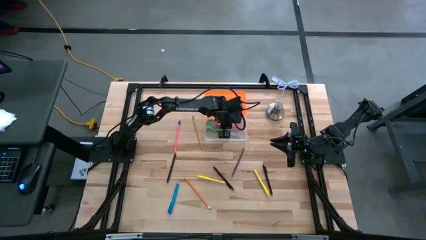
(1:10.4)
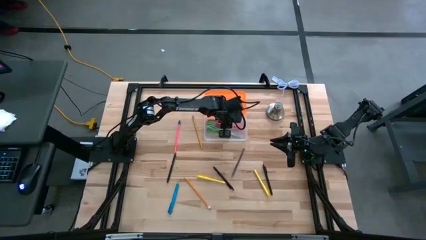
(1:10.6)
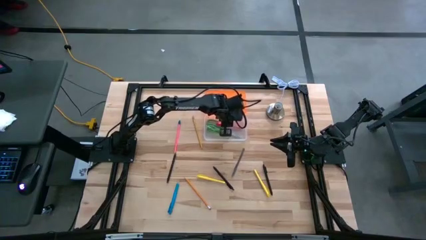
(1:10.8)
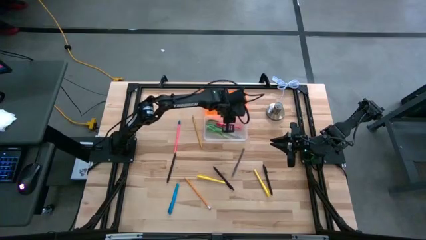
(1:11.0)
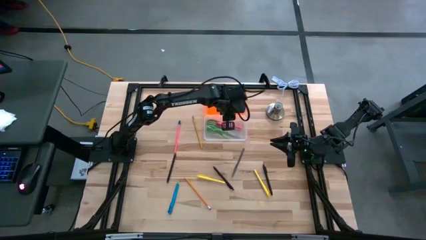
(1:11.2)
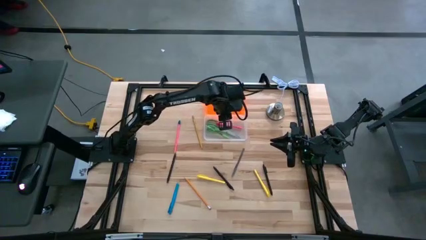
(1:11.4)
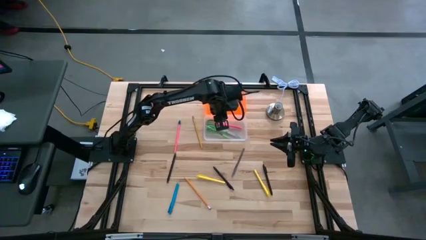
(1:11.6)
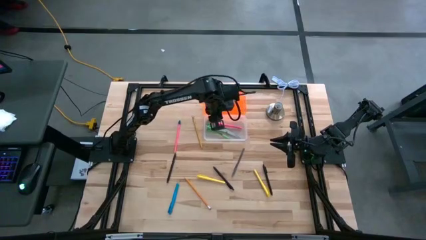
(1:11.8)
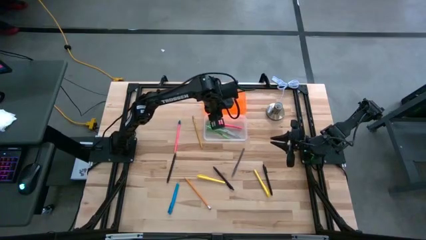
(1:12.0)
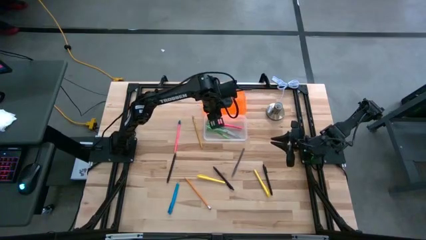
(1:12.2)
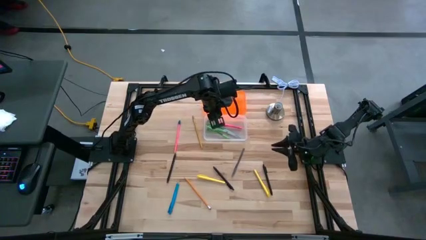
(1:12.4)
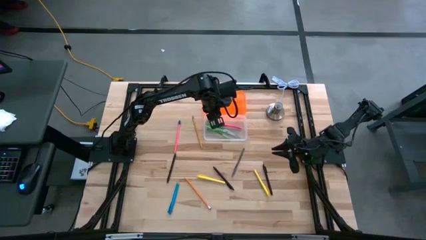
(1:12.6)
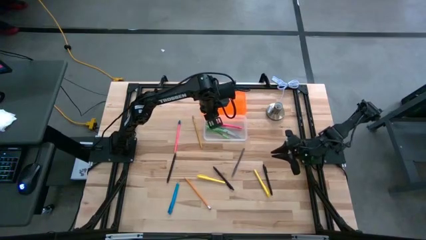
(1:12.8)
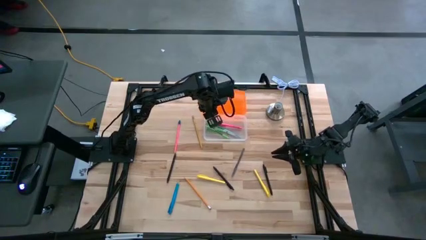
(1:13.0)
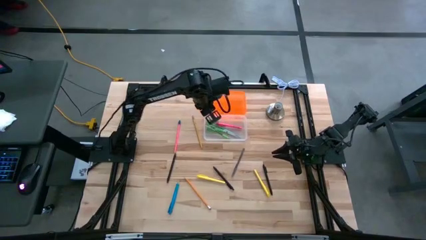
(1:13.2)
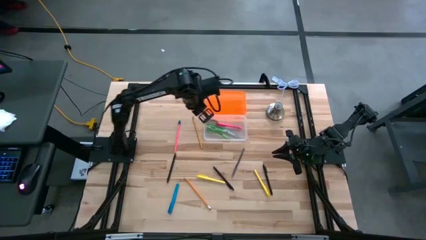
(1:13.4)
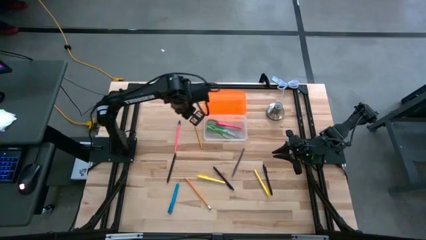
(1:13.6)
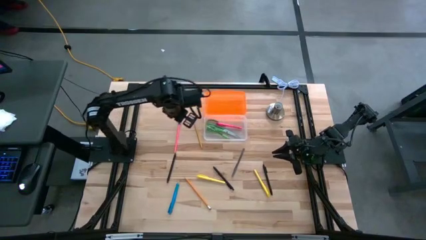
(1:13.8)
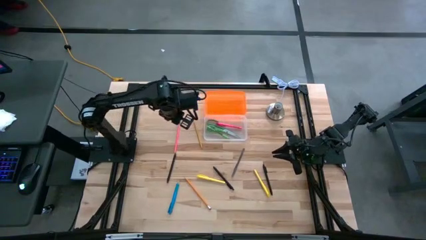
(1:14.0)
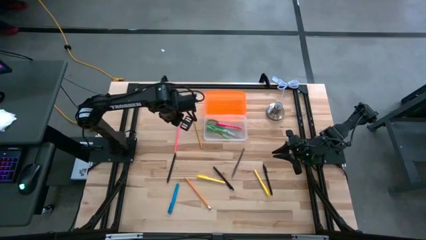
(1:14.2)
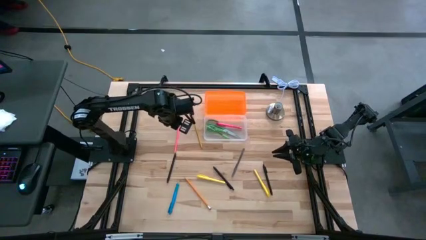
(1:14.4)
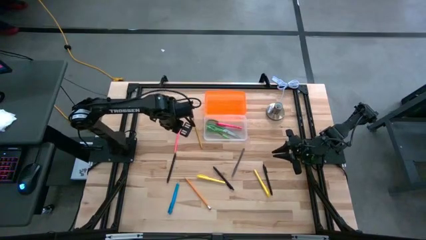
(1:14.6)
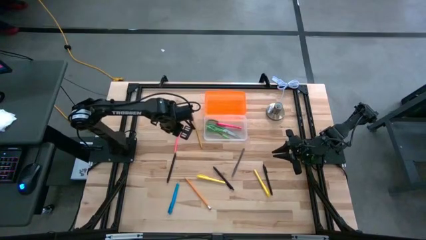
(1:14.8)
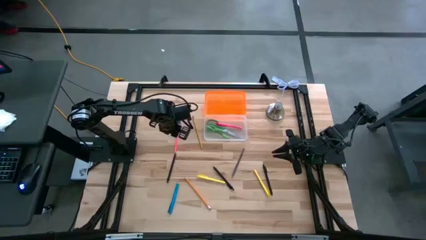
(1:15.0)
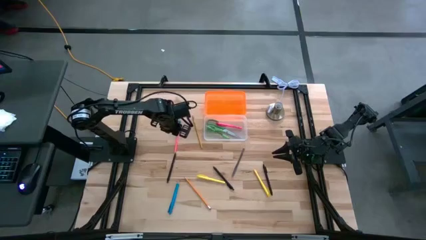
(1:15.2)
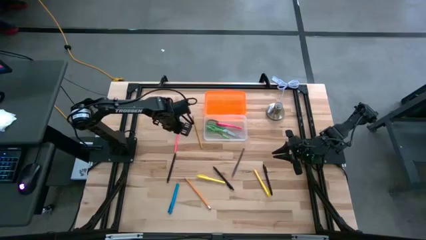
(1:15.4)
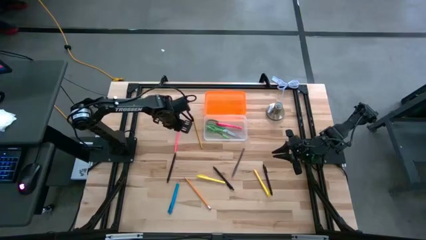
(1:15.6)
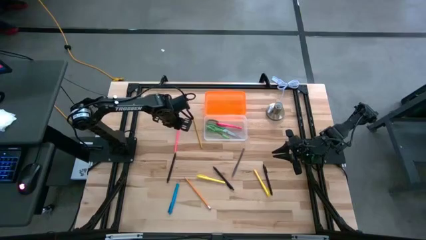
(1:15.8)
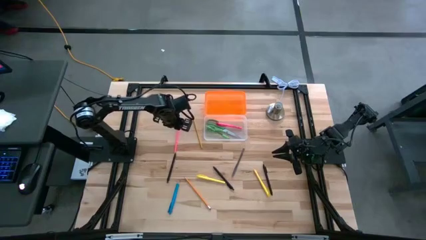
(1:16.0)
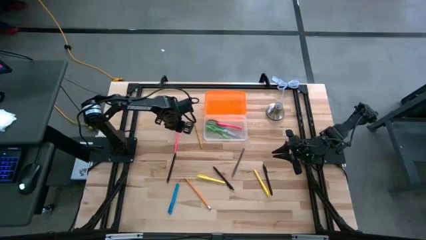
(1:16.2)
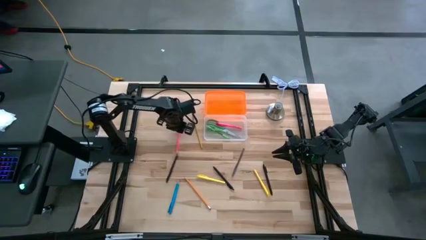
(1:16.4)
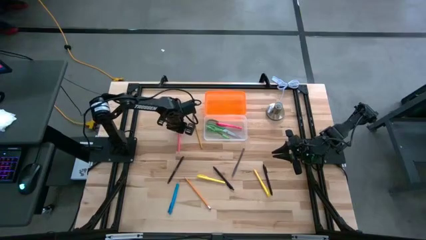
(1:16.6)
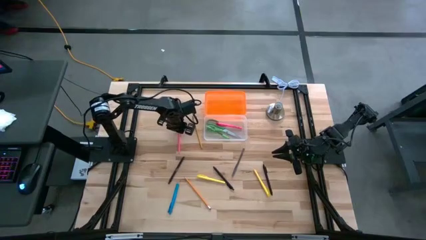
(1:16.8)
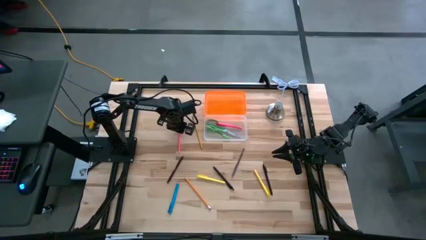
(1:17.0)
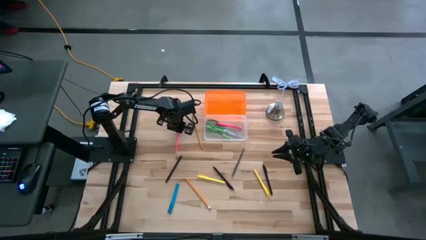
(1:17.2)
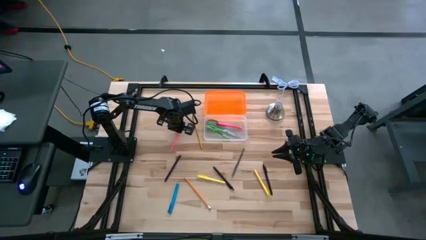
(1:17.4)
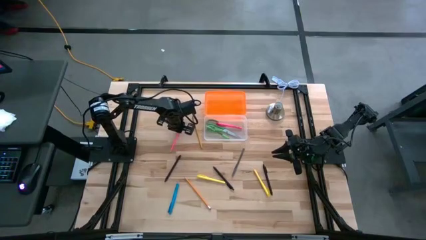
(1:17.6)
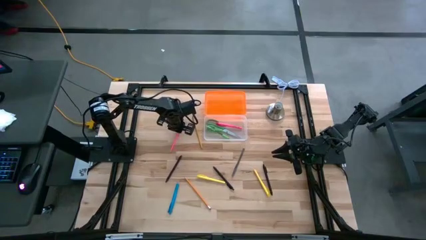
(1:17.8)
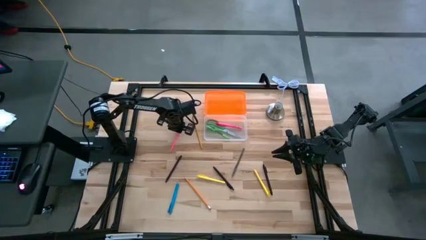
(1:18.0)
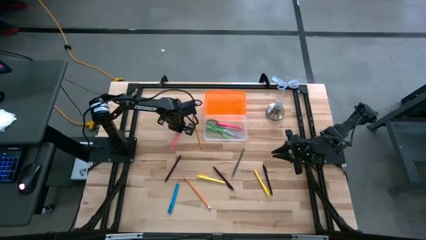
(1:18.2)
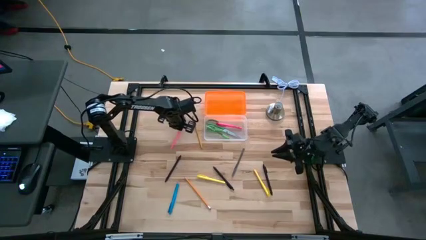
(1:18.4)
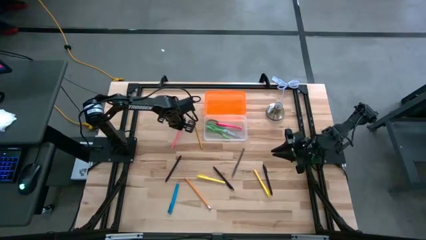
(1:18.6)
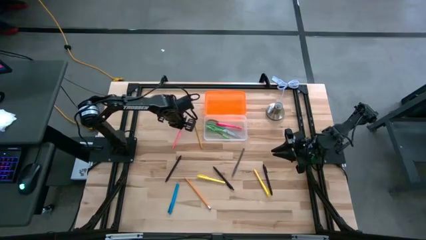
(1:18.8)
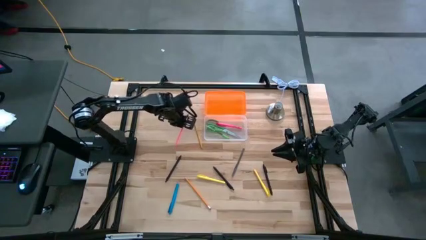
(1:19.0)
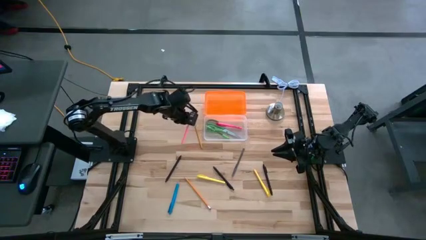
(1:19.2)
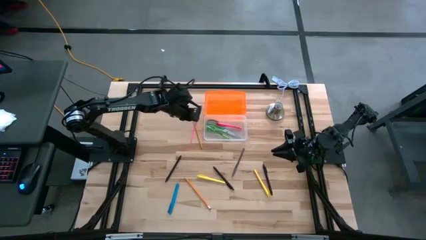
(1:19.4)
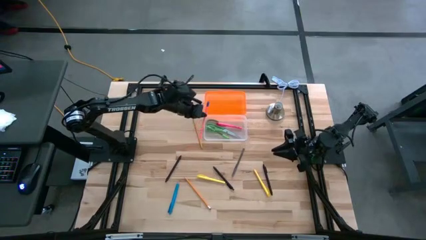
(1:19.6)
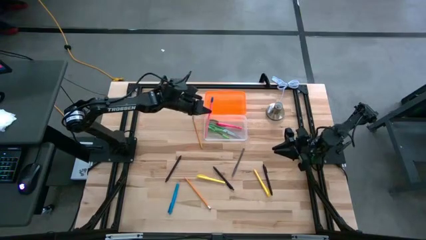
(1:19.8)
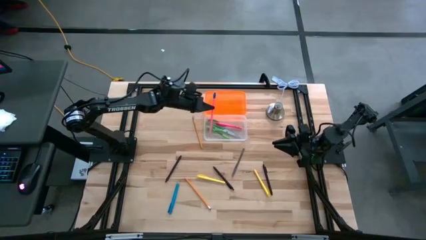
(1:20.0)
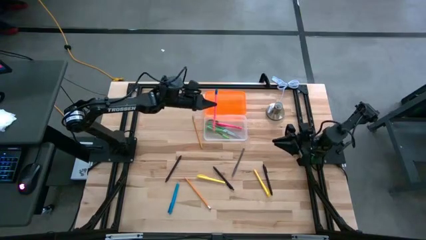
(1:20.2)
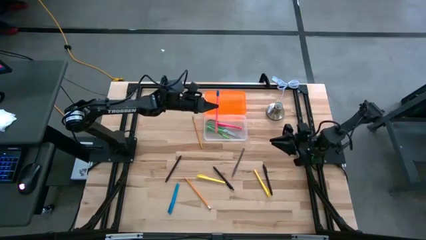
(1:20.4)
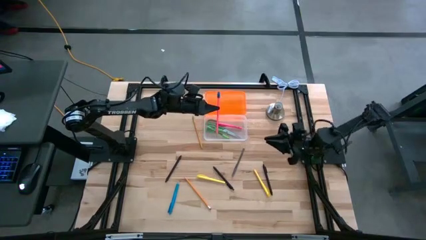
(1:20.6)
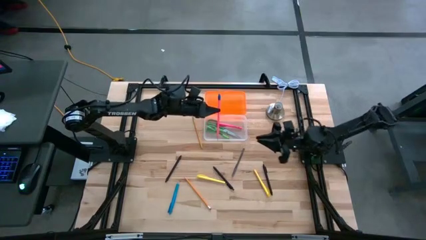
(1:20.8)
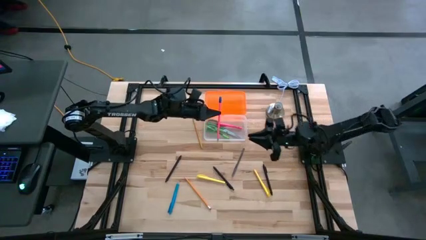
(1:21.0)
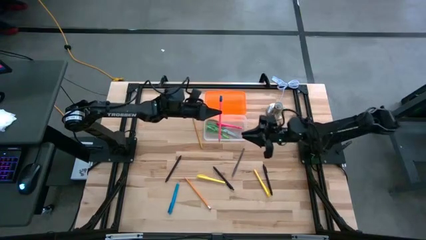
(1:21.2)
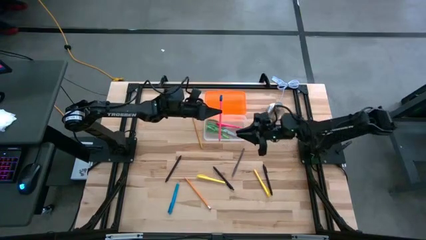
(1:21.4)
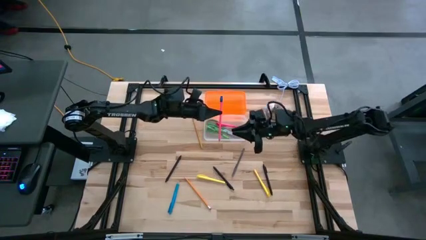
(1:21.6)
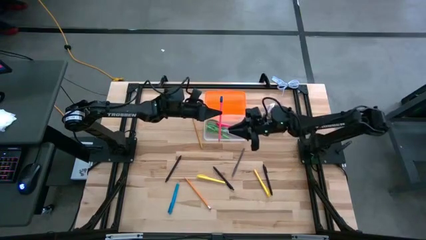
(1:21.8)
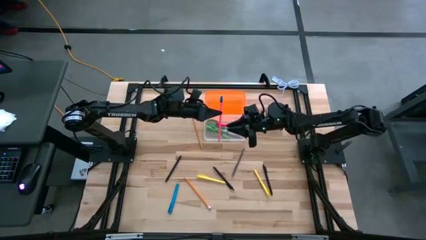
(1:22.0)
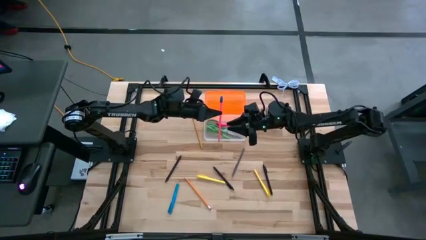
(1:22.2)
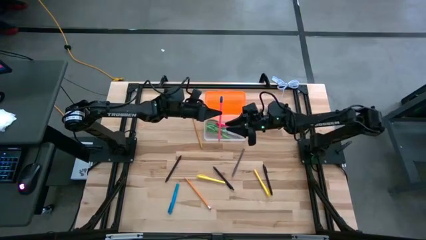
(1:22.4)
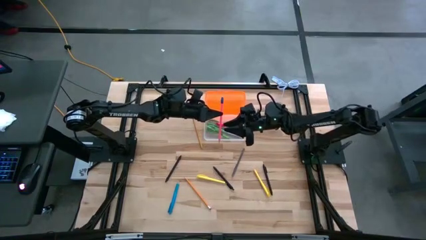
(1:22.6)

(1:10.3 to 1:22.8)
Task: Pick & place school supplies into a supply box
Put the pink pencil into the supply box

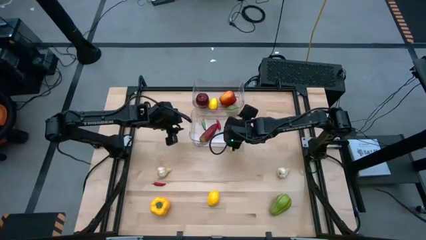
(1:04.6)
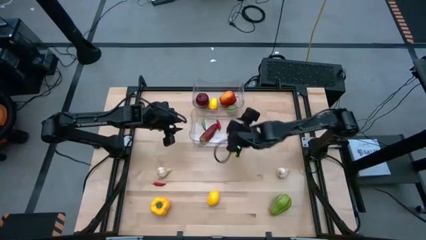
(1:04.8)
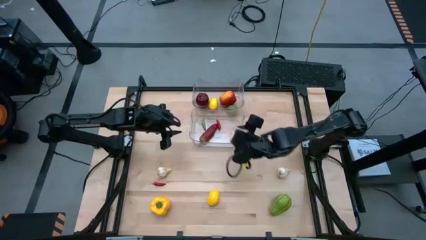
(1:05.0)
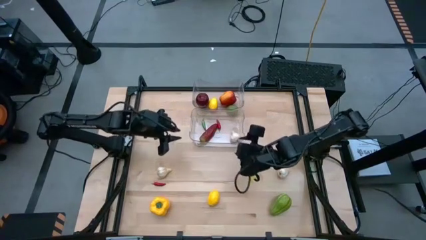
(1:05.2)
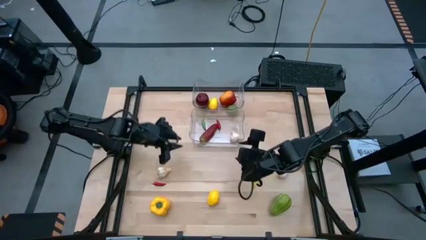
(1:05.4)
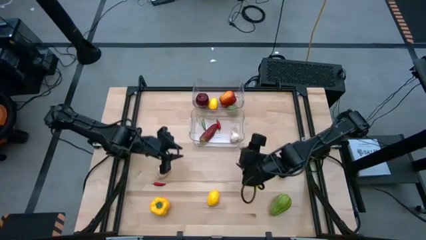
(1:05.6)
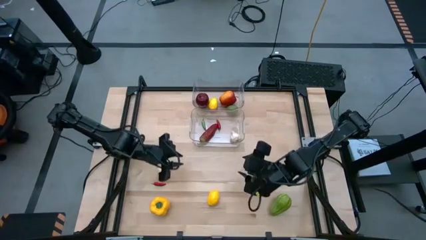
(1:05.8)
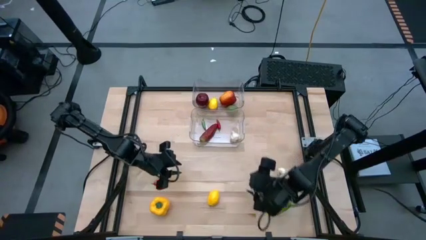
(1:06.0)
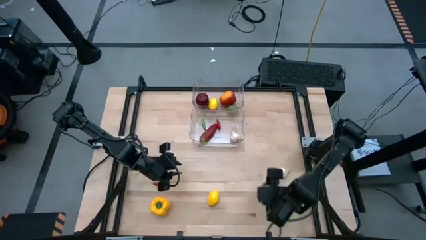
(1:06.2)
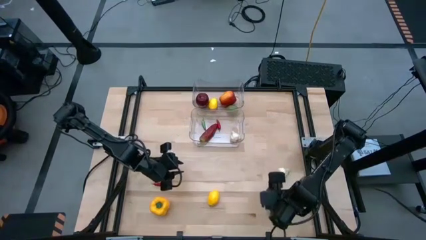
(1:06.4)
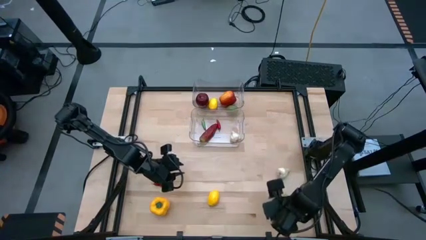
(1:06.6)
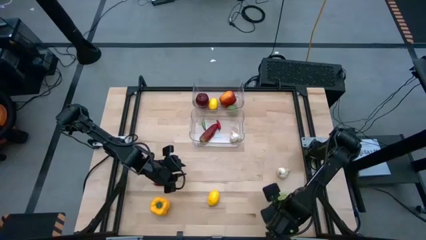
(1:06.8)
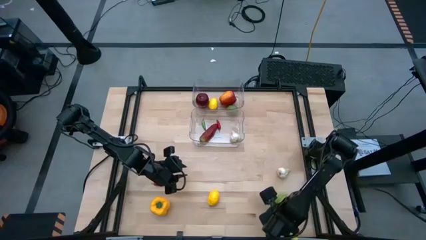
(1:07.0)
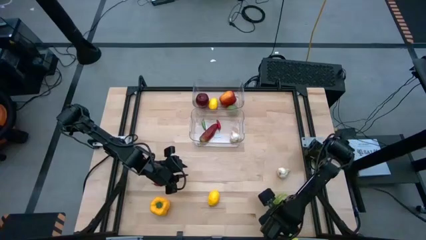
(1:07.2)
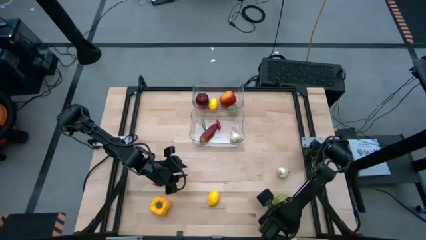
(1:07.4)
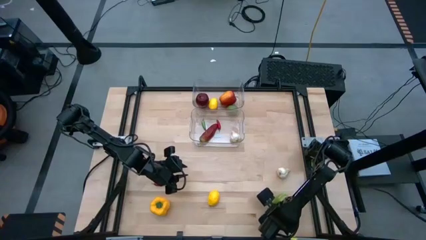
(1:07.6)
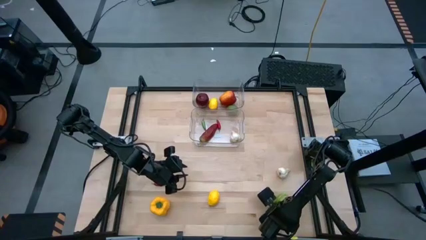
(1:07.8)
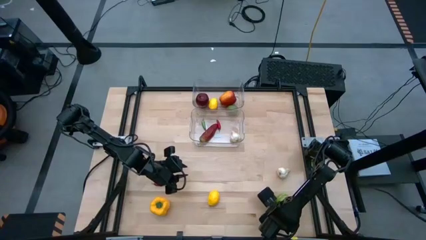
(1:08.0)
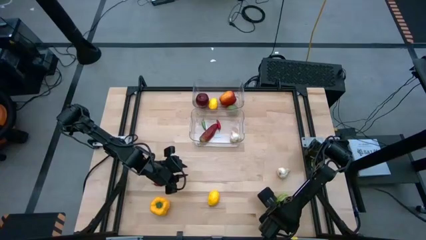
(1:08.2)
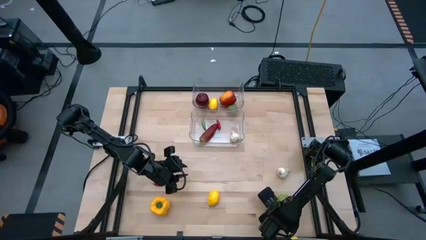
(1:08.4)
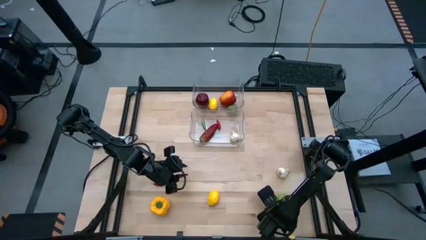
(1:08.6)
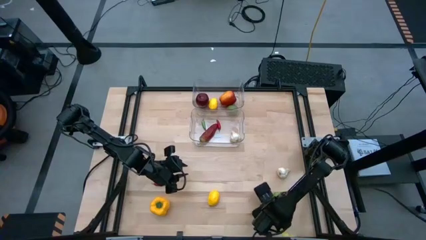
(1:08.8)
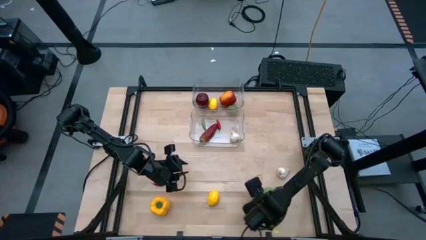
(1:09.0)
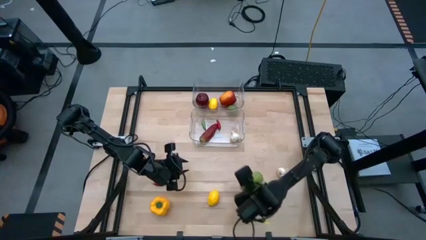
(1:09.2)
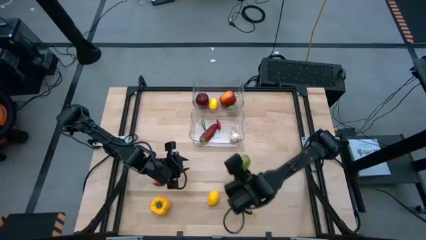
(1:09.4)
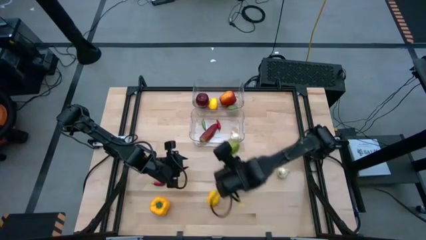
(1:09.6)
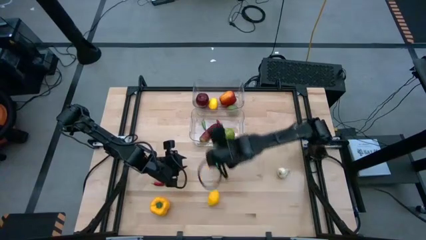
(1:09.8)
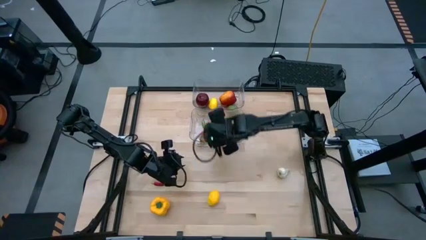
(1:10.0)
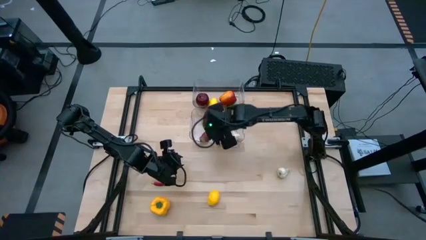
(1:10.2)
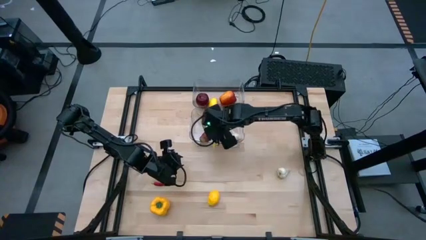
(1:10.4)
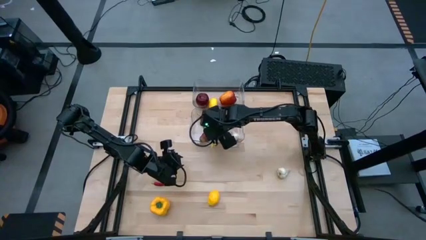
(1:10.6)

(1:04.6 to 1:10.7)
Task: Sort produce into baskets
Put the chayote into the bottom transparent bin
